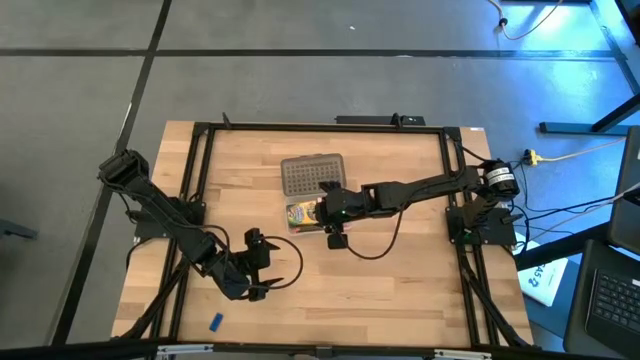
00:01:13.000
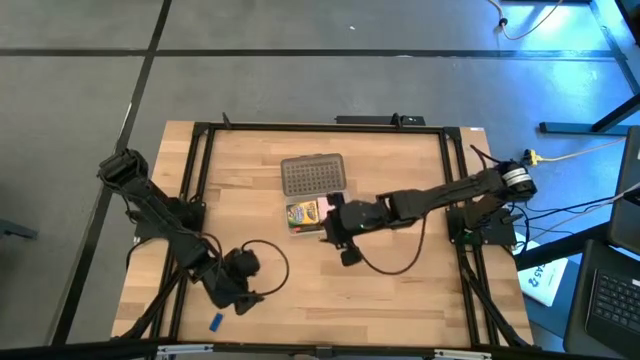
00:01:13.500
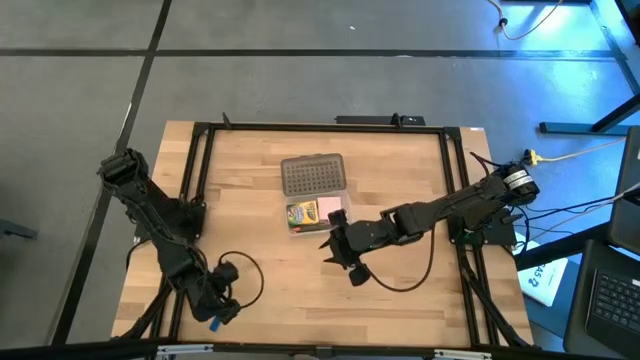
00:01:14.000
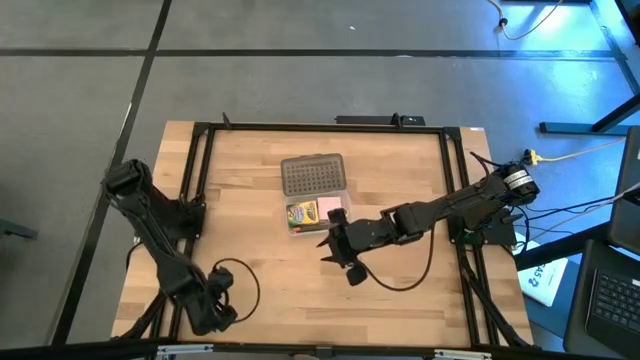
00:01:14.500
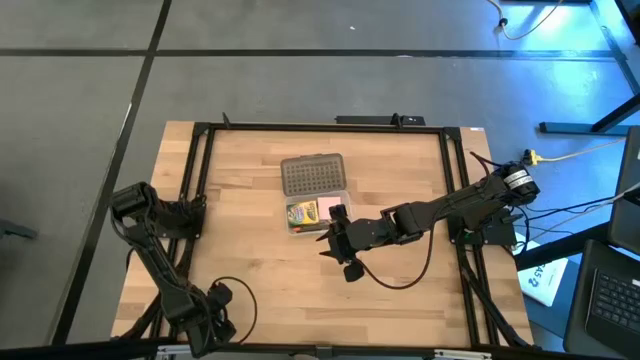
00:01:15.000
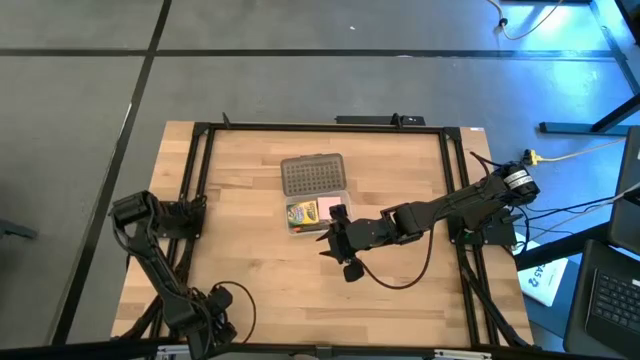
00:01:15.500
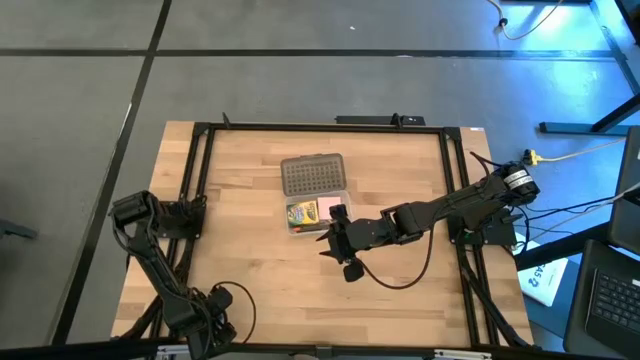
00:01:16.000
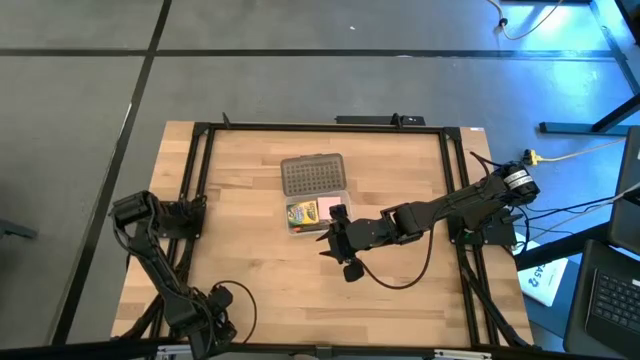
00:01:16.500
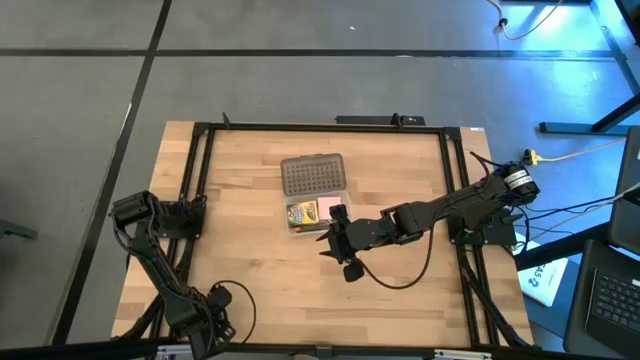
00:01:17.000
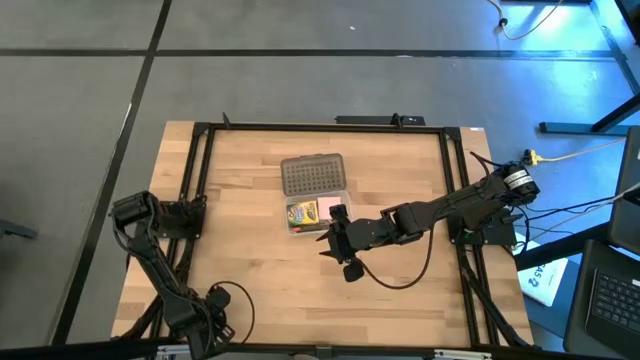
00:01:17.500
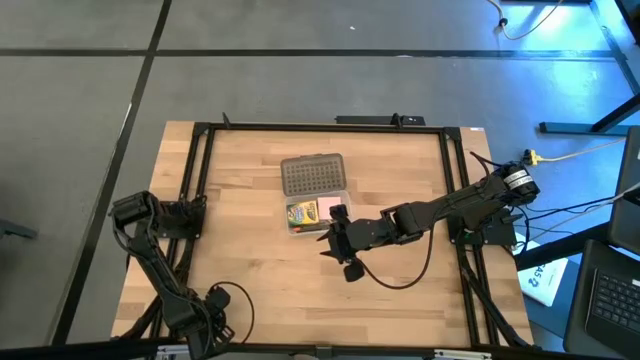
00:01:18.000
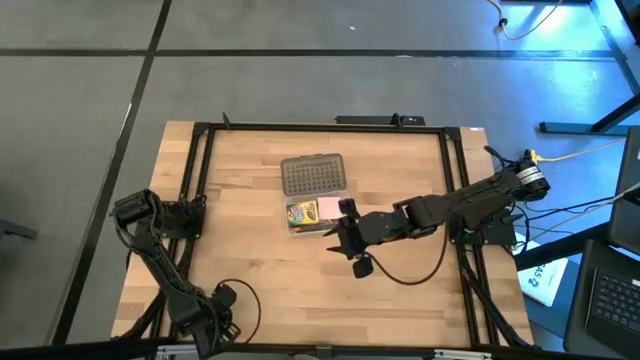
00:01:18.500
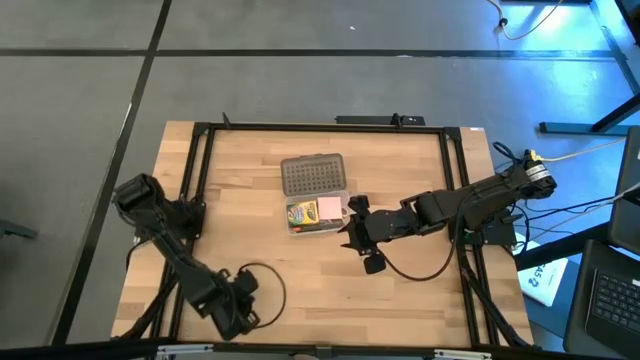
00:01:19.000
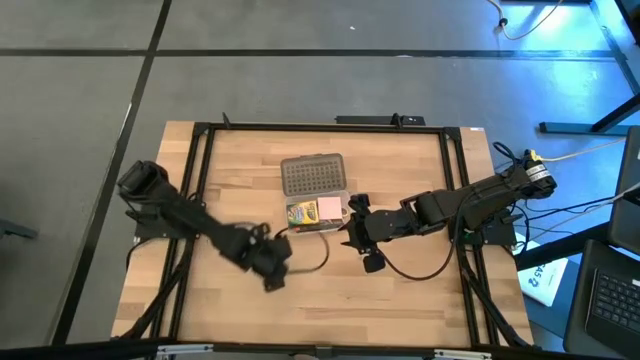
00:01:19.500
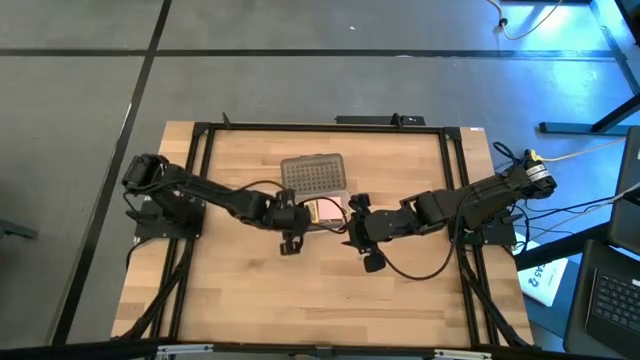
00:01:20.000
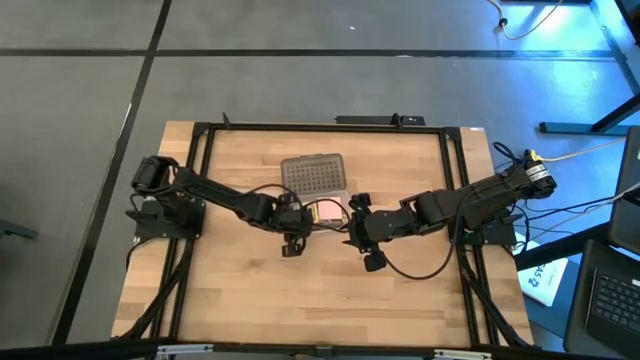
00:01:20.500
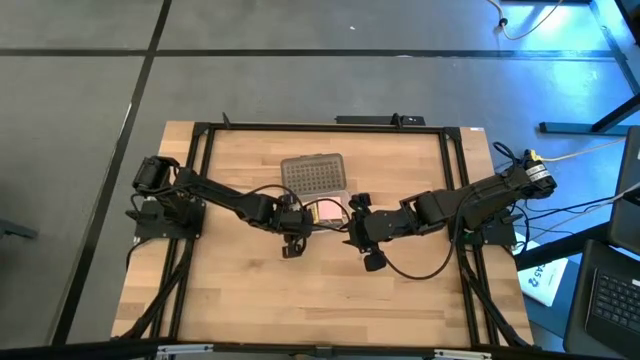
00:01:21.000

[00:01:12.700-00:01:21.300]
Task: Pack school essentials
Put the blue eraser into the black supply box

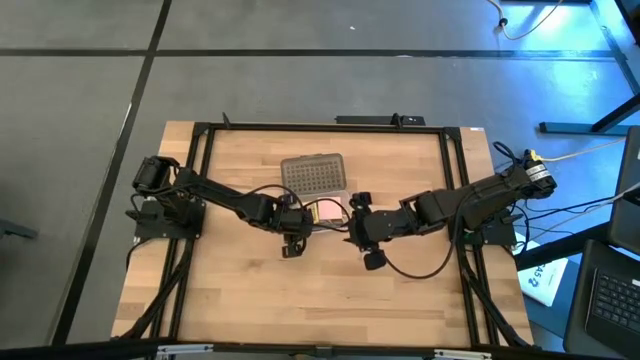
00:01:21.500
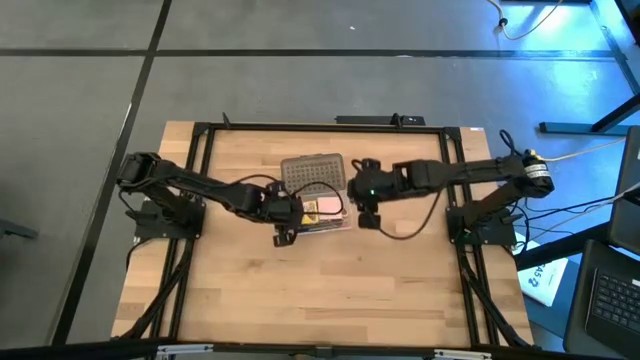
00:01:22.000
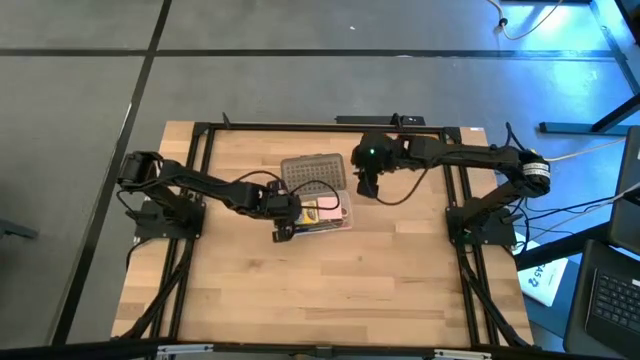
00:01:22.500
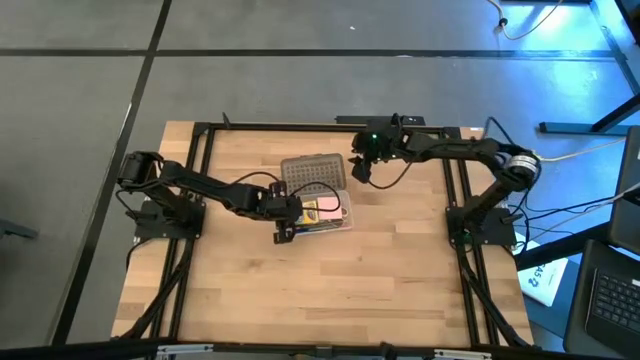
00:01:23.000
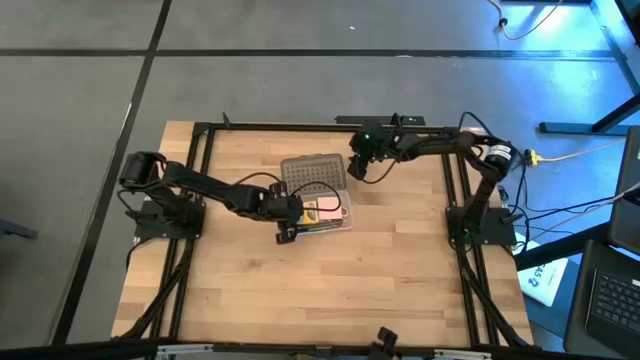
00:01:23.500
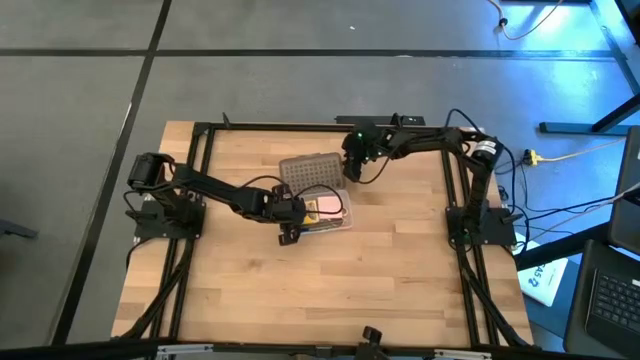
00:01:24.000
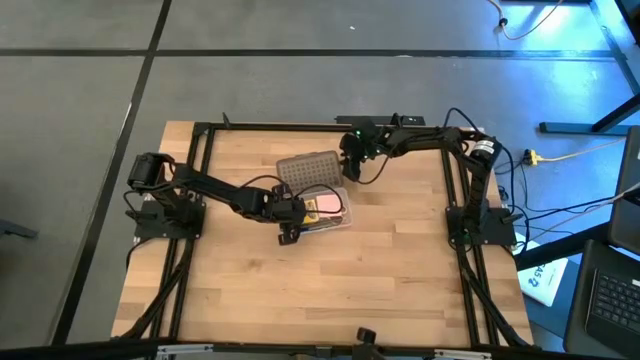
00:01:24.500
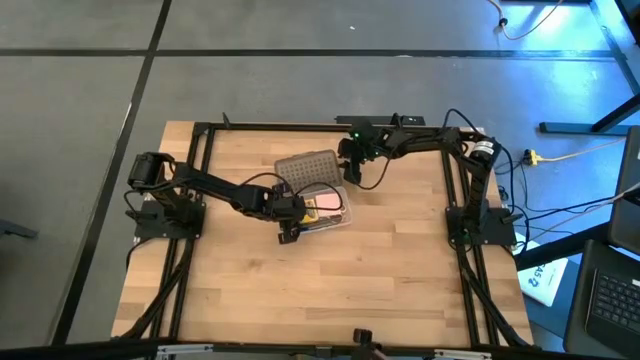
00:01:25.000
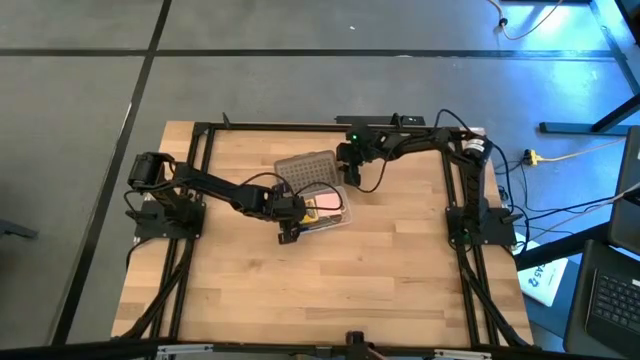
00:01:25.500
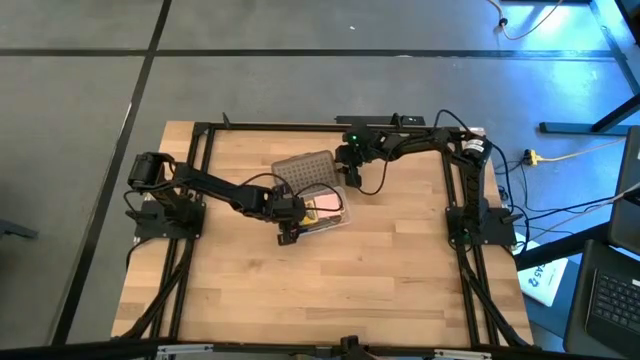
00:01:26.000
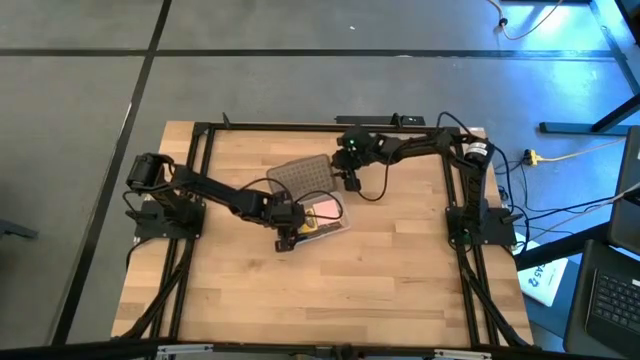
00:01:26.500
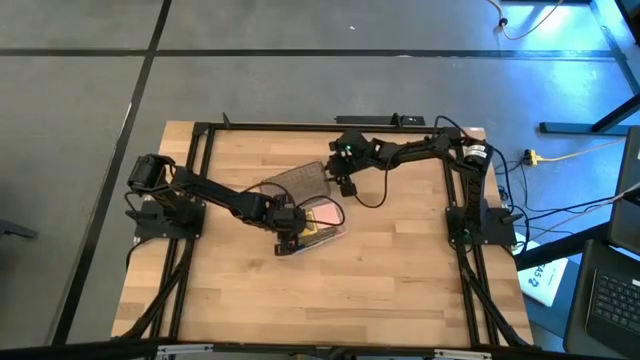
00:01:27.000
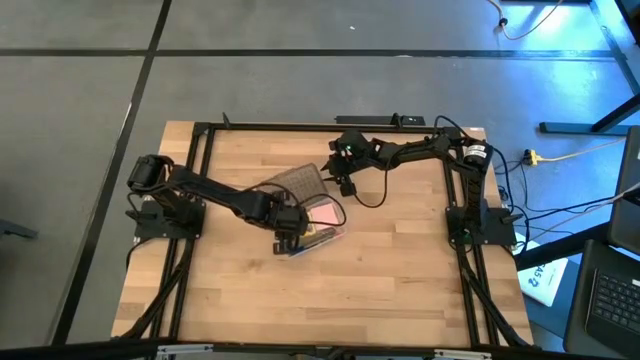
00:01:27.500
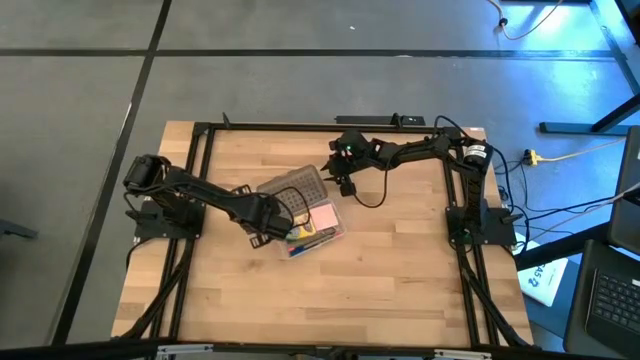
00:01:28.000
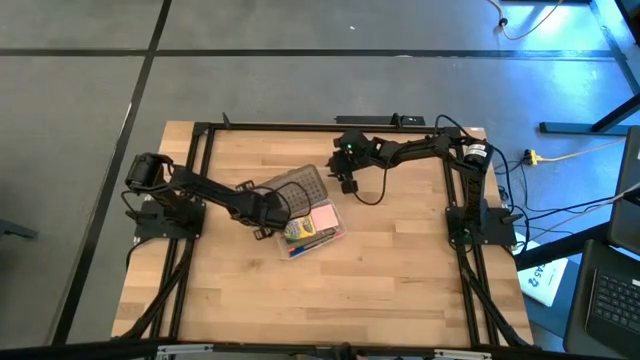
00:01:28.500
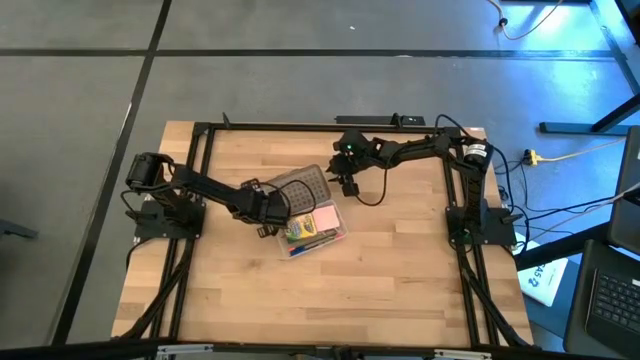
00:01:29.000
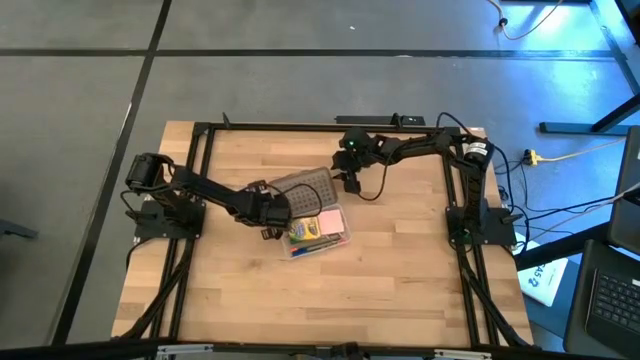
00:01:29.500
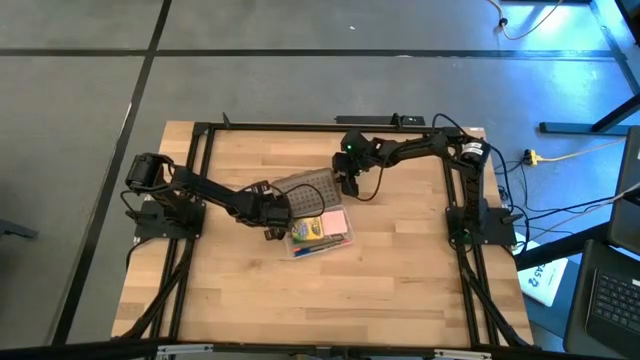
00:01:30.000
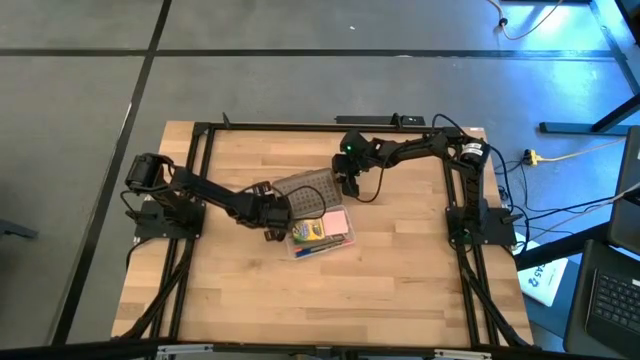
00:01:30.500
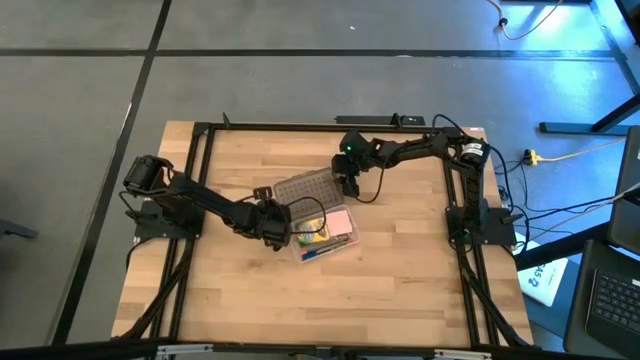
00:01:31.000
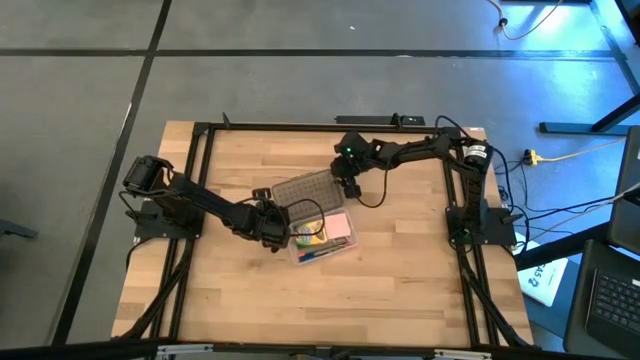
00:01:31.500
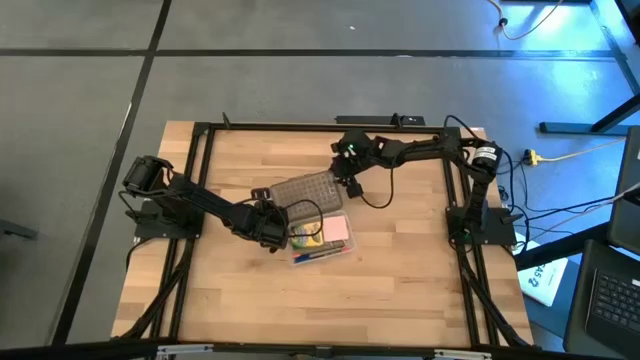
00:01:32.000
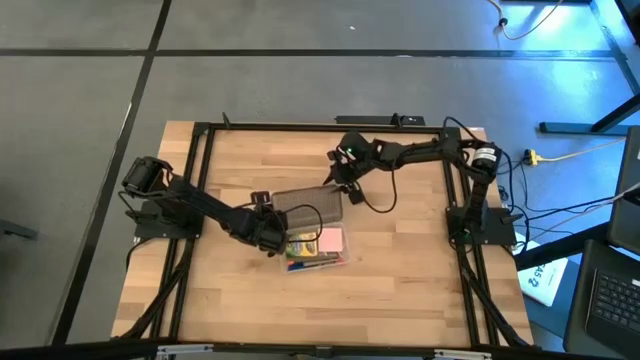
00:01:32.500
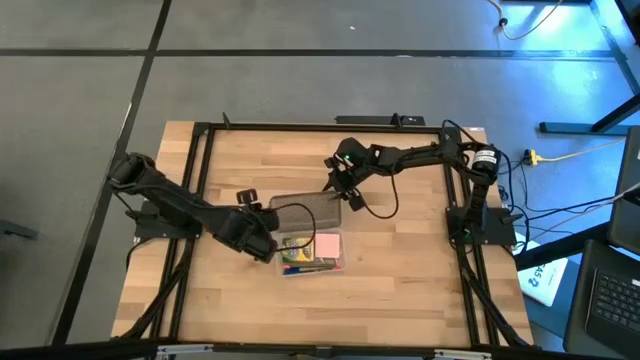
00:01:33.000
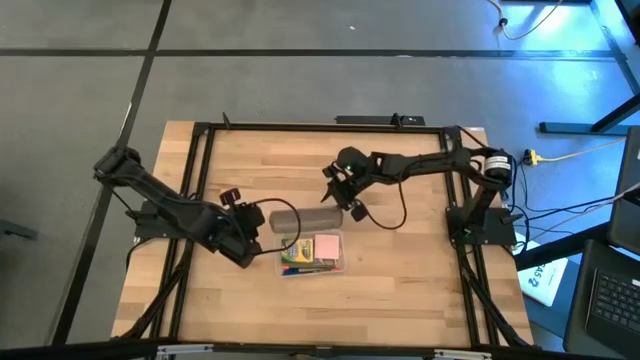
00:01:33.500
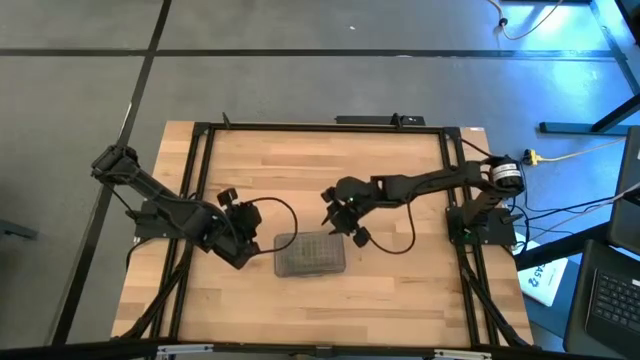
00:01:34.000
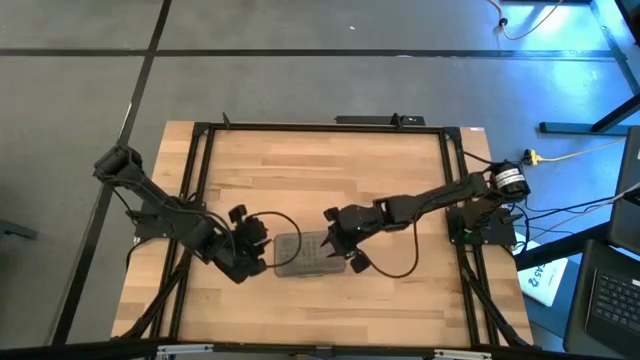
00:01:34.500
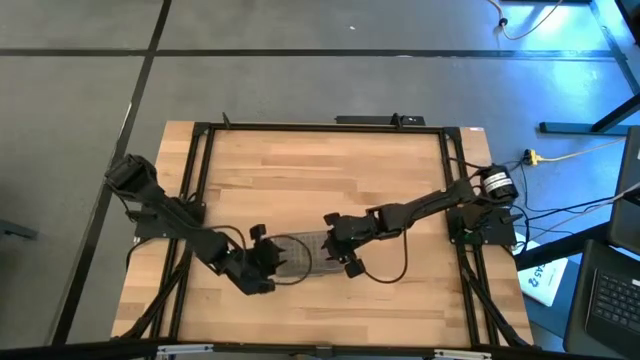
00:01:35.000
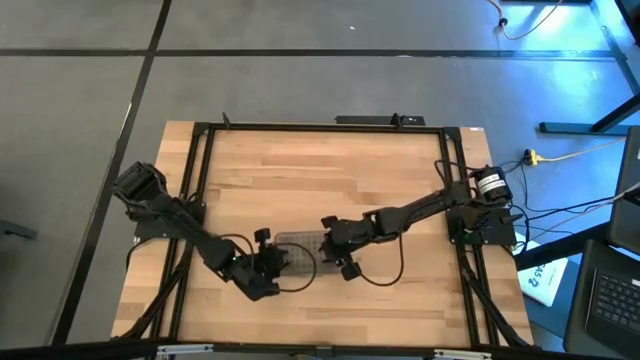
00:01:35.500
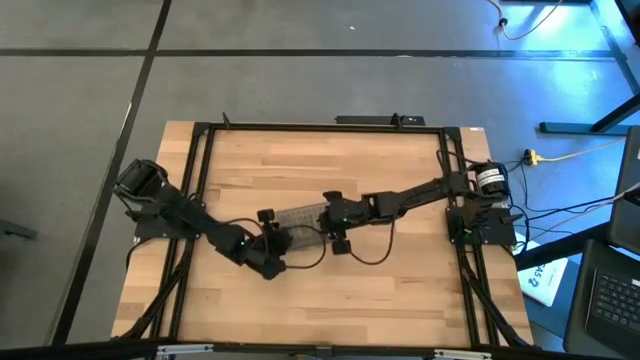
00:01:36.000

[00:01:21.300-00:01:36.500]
Close the black supply box
